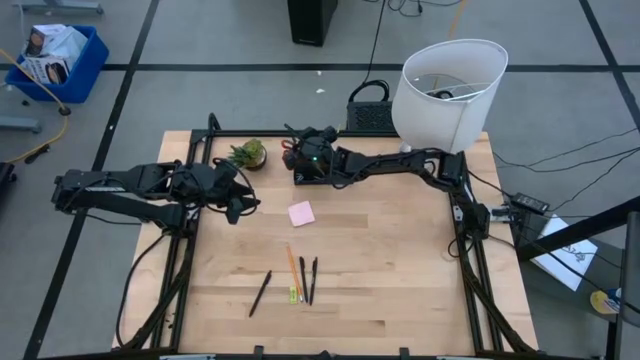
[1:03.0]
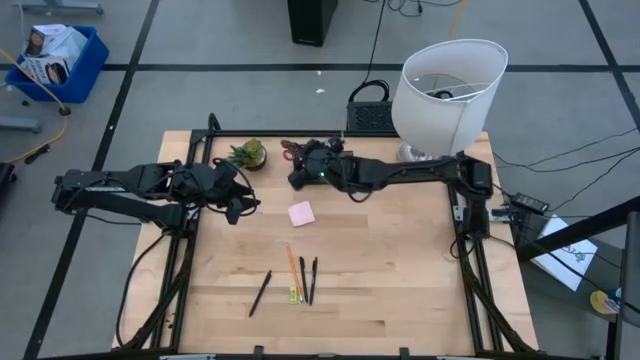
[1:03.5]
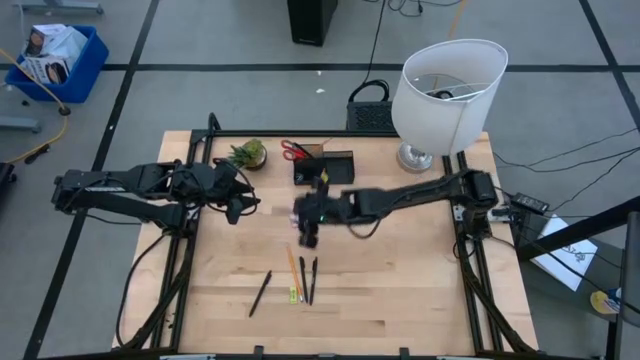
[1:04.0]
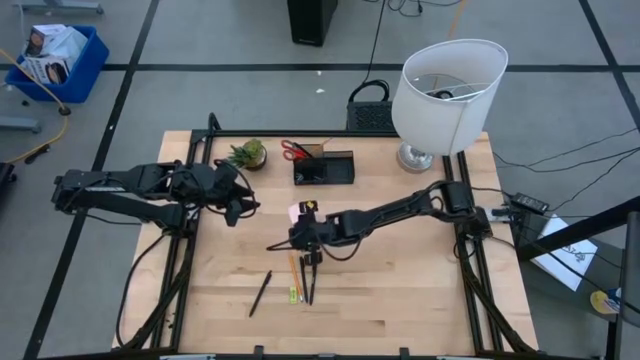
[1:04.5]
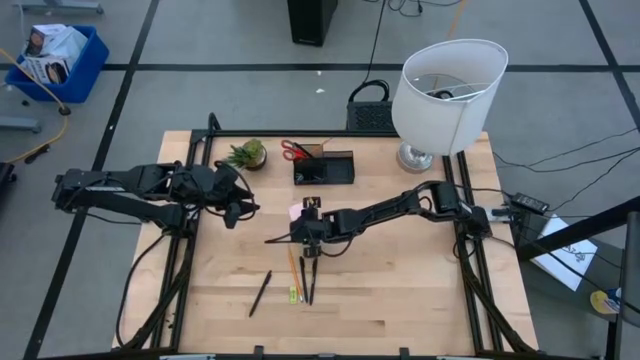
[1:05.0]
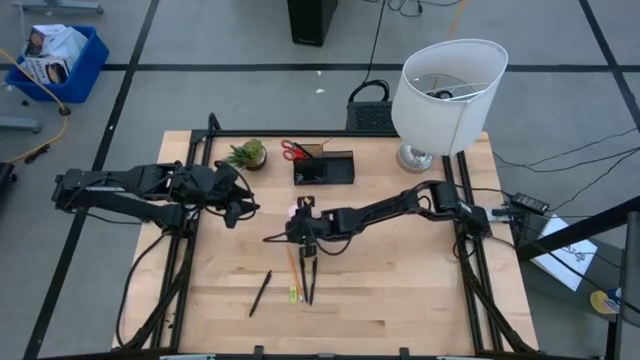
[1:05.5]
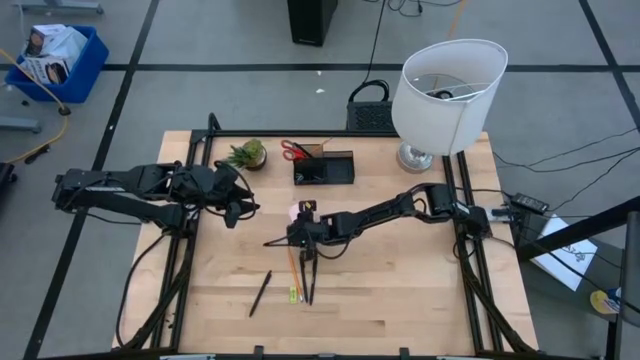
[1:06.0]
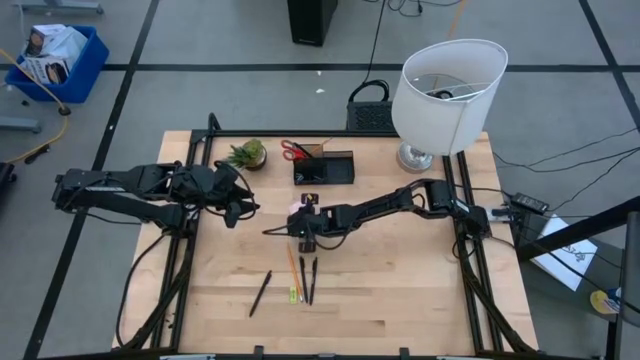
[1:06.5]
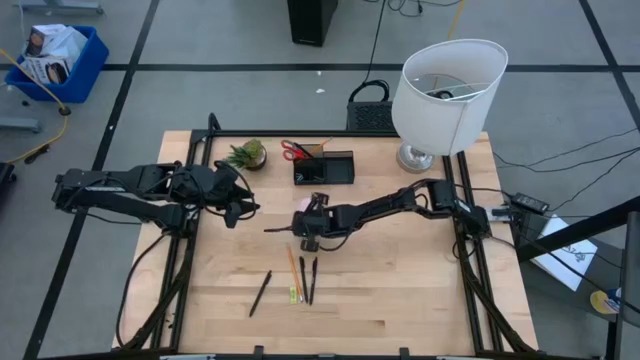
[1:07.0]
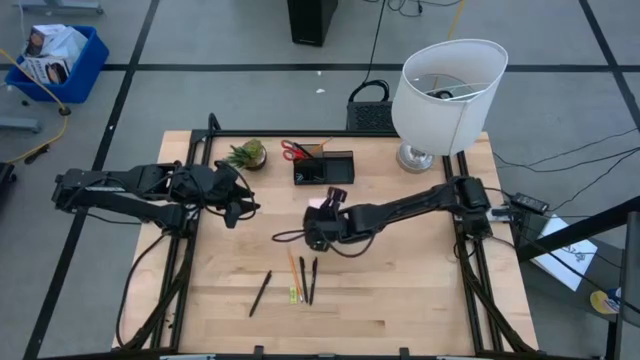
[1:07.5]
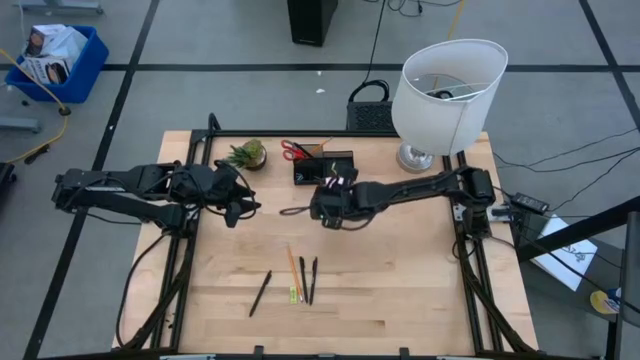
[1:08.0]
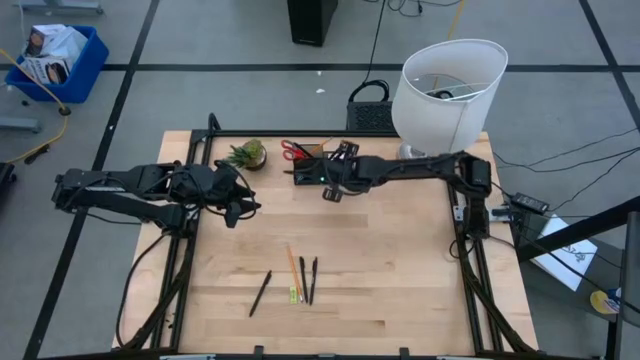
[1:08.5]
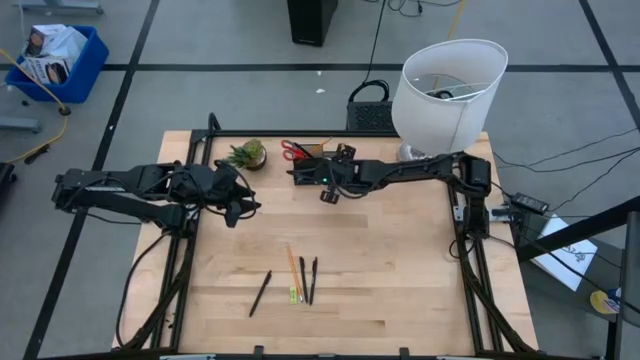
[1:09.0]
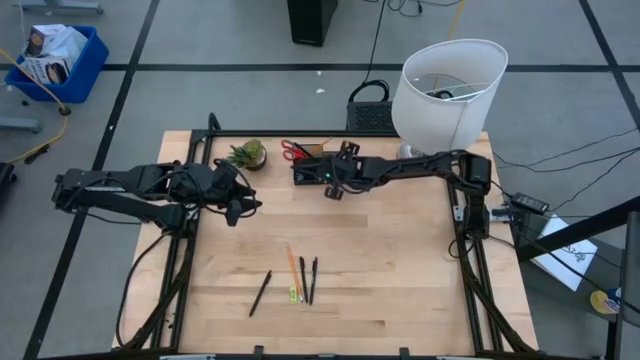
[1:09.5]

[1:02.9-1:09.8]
Task: Pick and place office supplies into organizer
Put the pink sticky notes into the black desk organizer

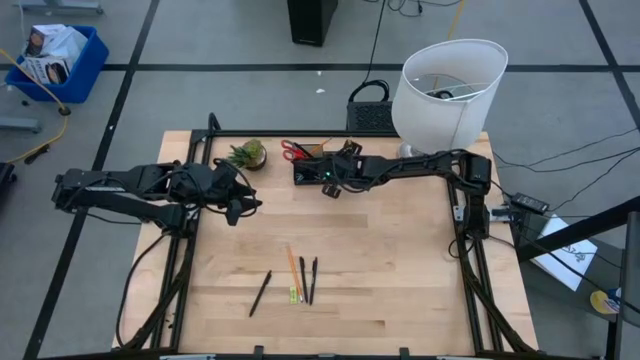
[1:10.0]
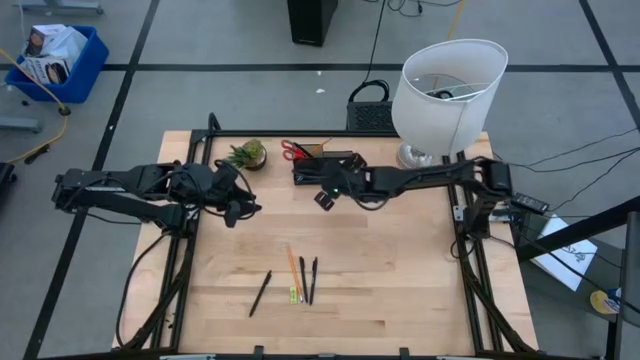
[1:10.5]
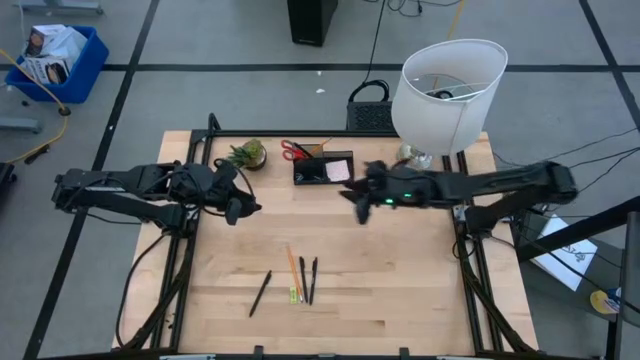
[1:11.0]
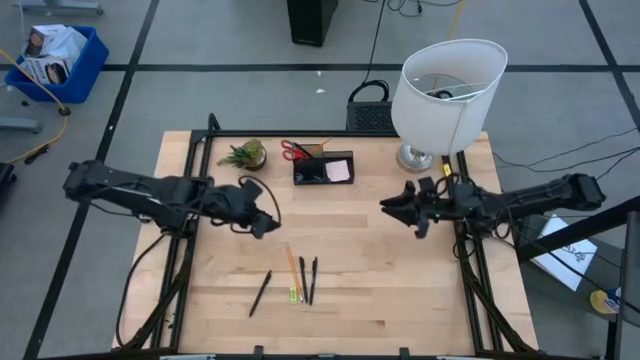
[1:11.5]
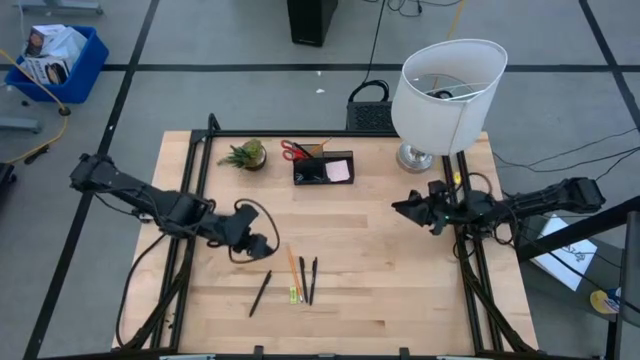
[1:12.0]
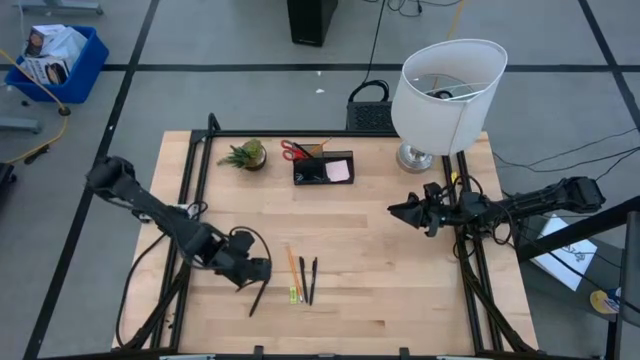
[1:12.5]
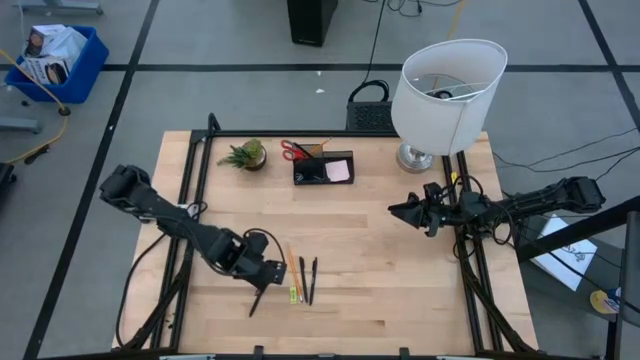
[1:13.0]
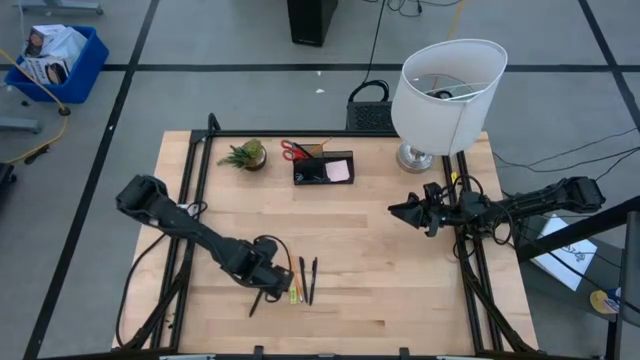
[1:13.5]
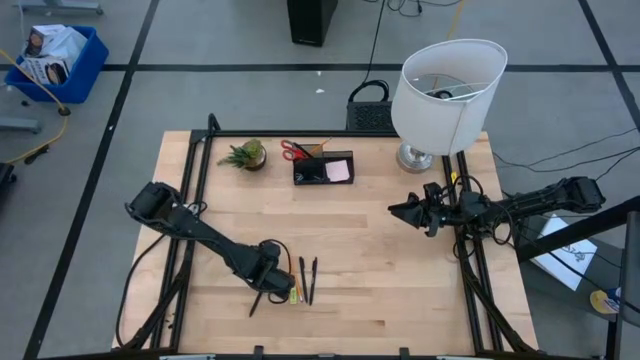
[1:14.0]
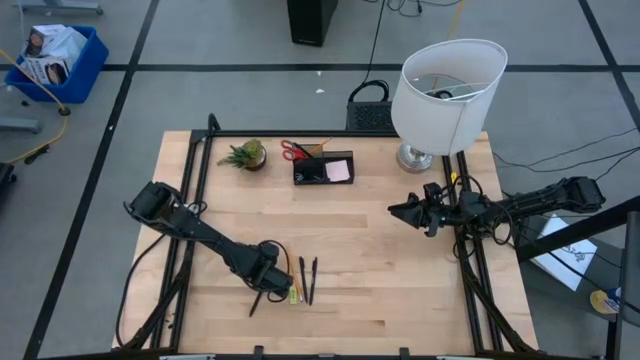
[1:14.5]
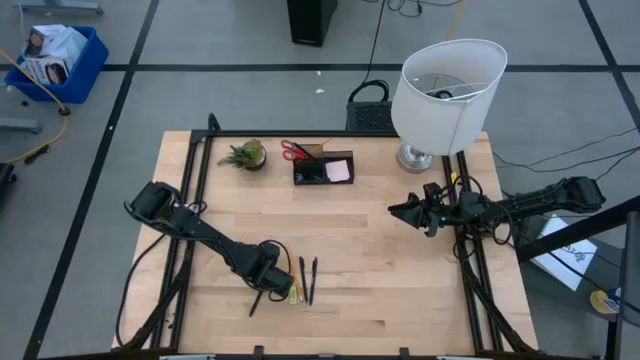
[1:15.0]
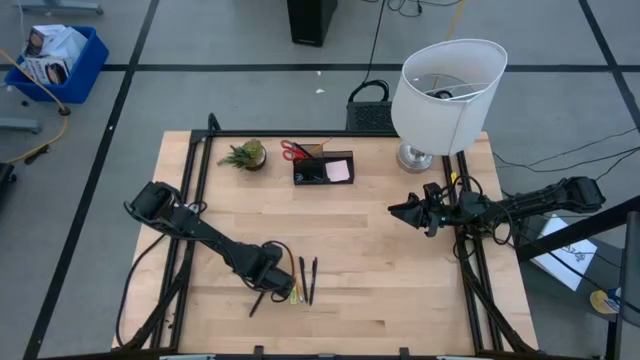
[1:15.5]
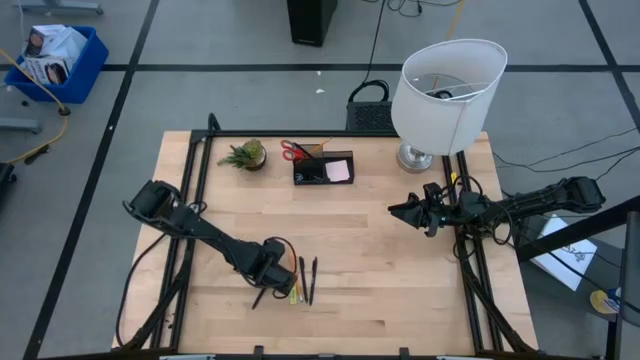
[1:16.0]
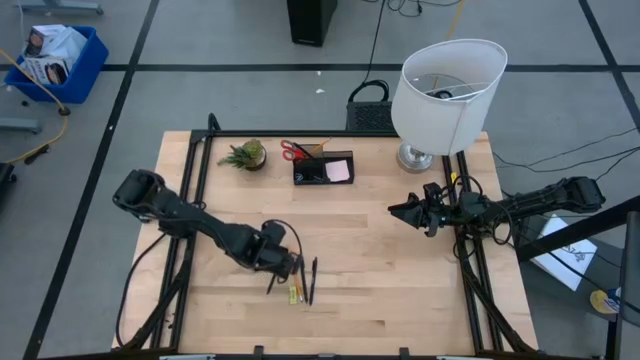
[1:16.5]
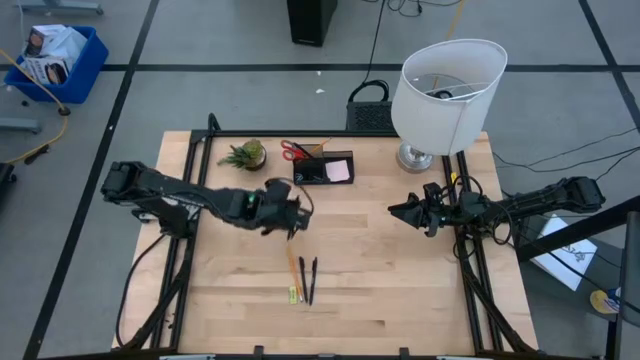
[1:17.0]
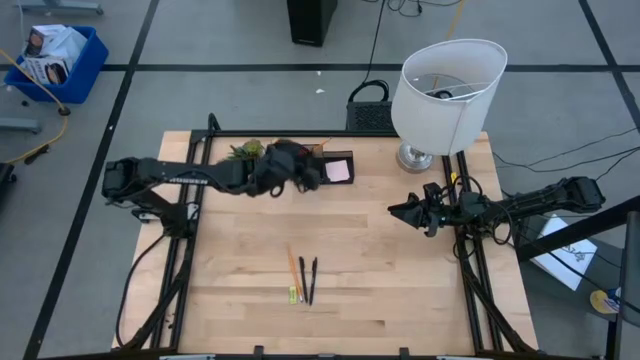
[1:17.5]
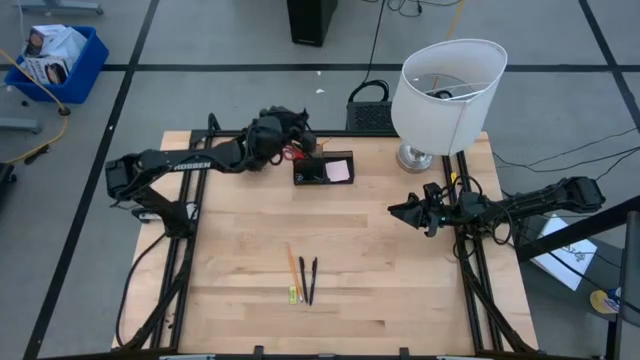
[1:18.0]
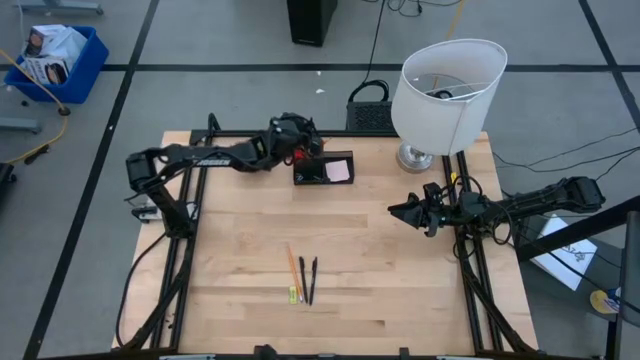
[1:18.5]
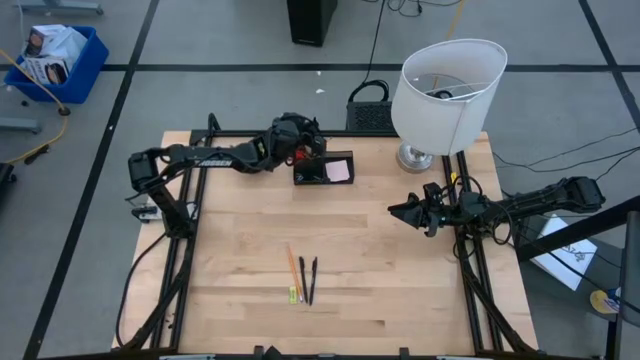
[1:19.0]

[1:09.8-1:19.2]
Put the black pen into the black desk organizer

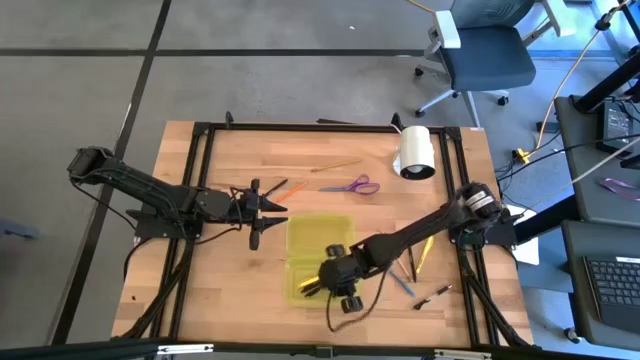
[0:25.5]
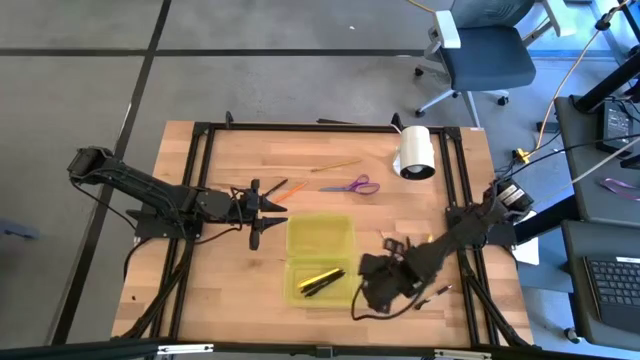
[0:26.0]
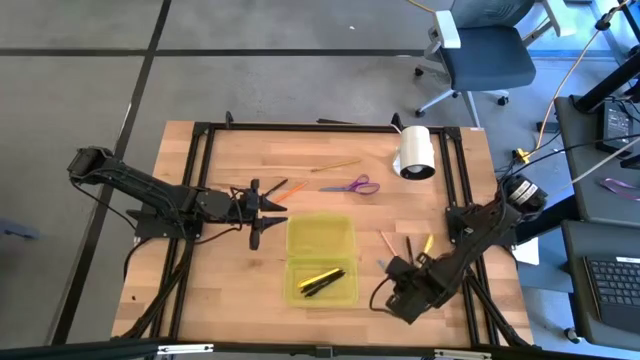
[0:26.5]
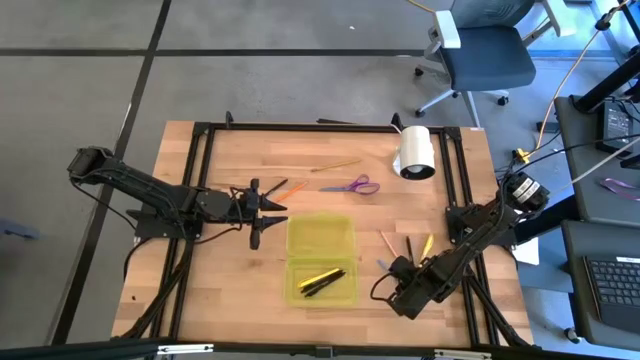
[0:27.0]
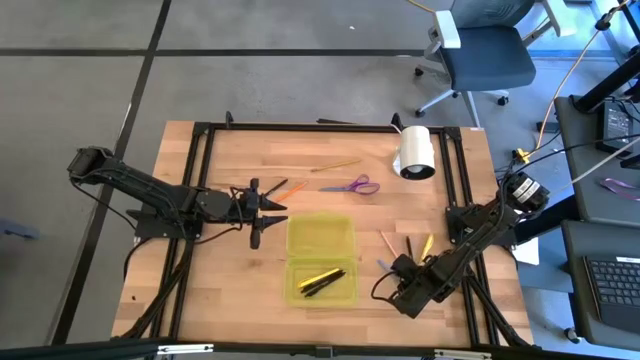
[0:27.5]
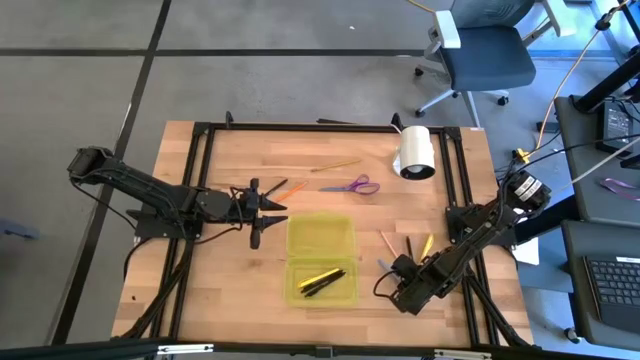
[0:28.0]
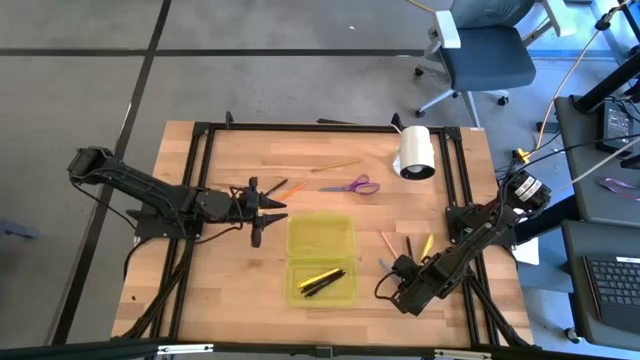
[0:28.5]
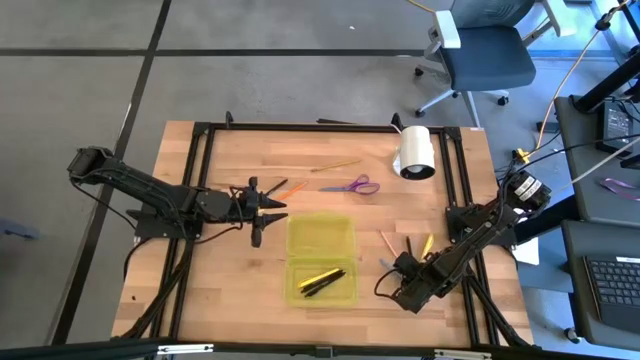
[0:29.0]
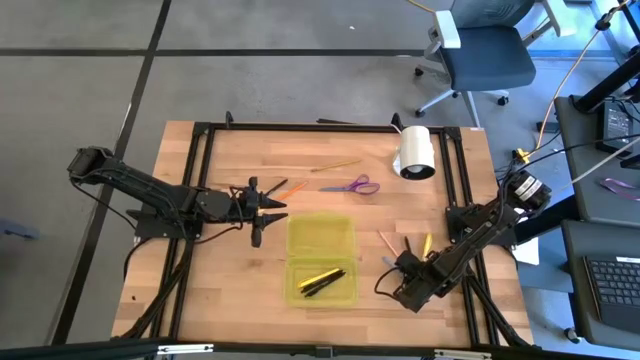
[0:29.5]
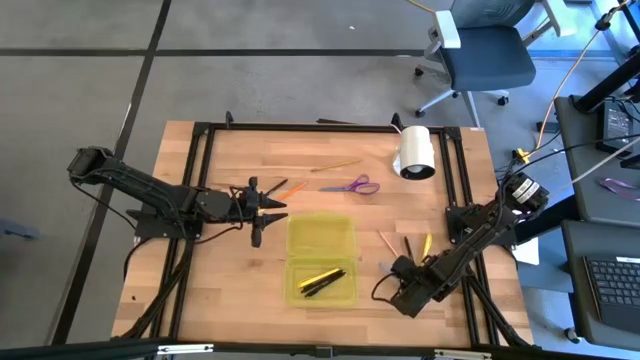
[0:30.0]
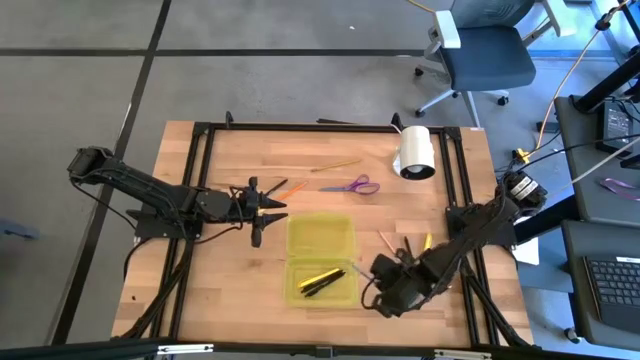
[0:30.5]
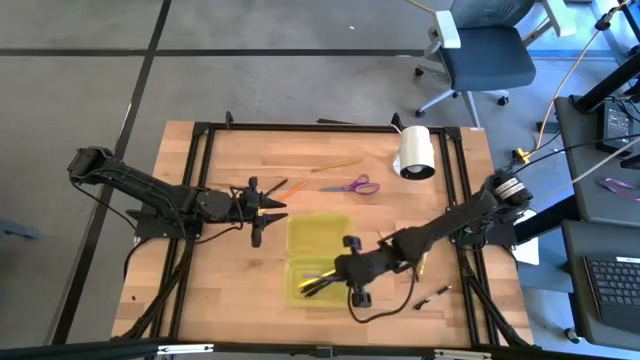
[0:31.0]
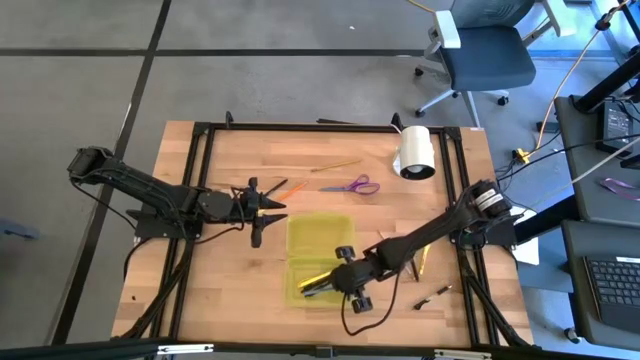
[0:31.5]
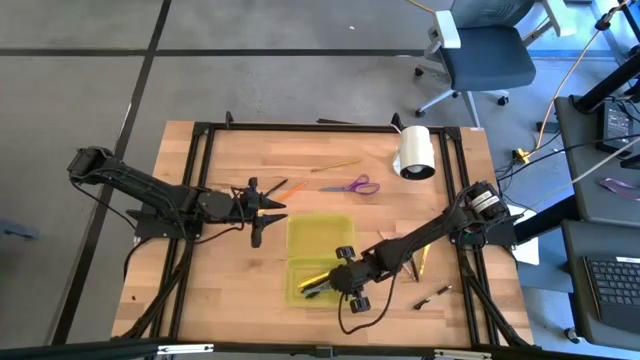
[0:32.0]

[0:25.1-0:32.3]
Task: Pick & place school supplies into a supply box
Put the blue pen into the yellow supply box
